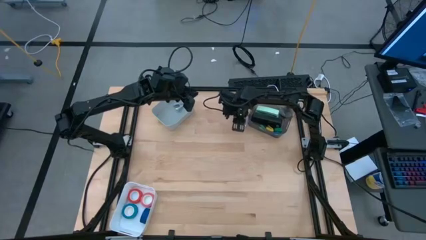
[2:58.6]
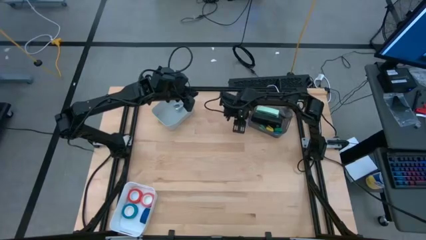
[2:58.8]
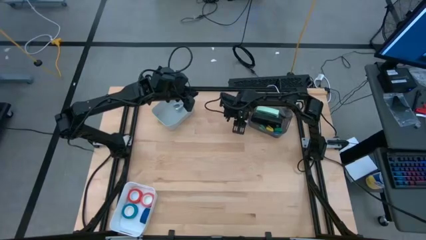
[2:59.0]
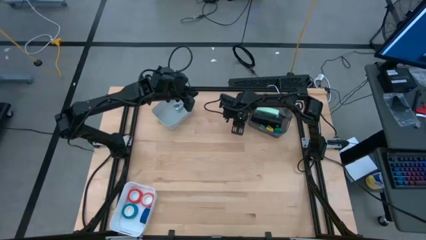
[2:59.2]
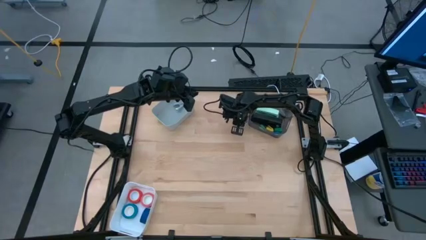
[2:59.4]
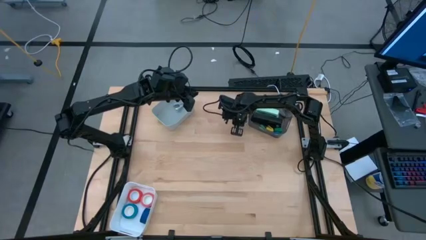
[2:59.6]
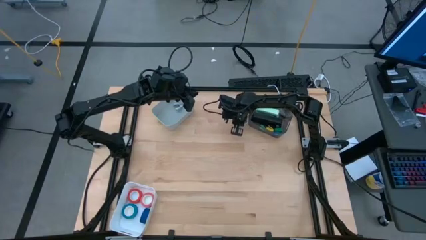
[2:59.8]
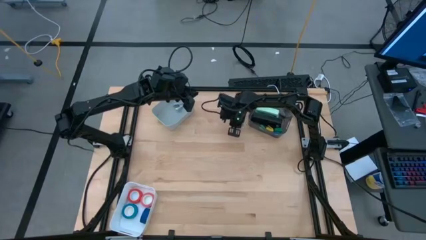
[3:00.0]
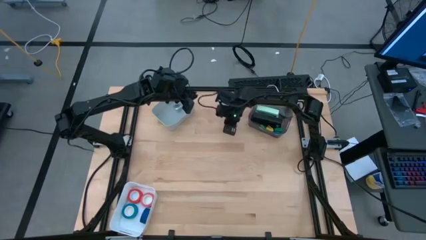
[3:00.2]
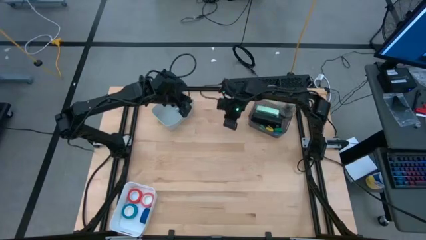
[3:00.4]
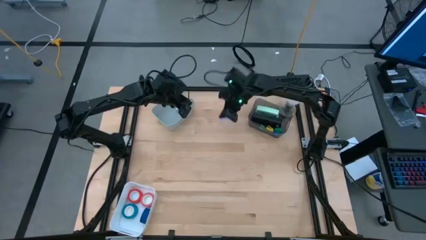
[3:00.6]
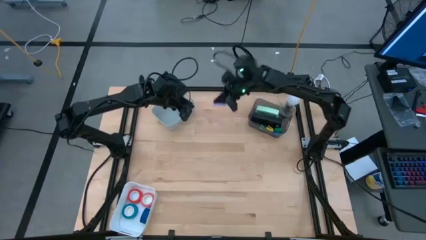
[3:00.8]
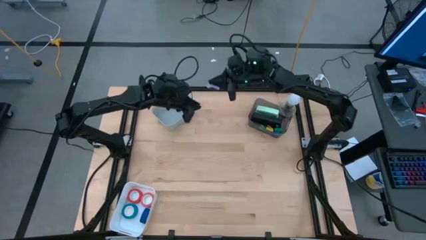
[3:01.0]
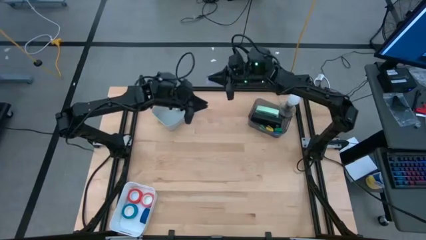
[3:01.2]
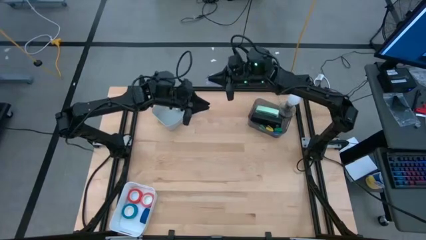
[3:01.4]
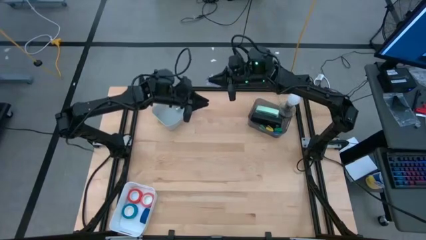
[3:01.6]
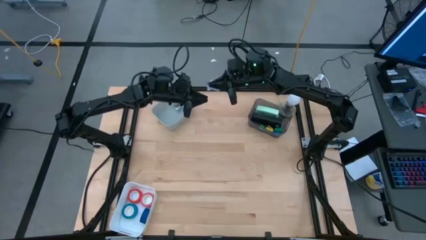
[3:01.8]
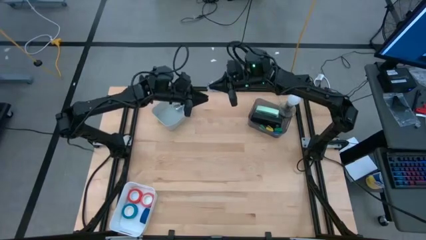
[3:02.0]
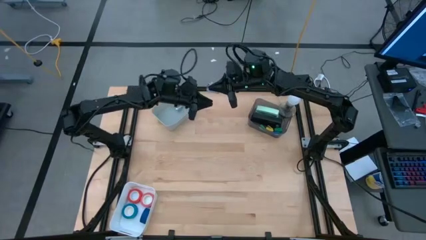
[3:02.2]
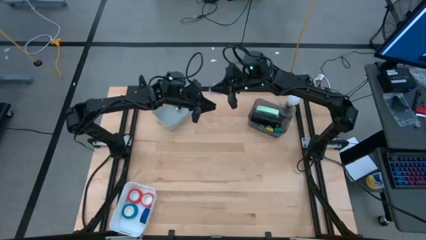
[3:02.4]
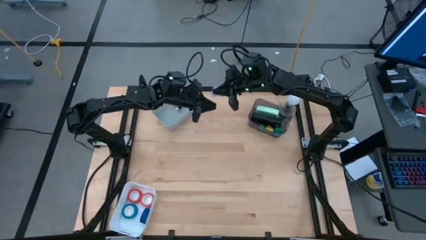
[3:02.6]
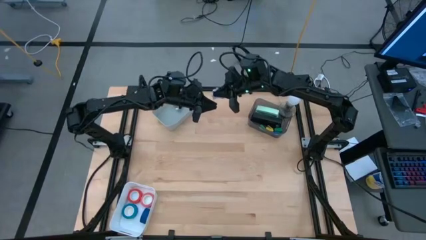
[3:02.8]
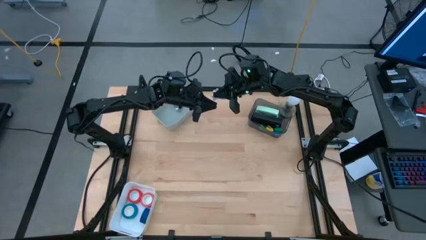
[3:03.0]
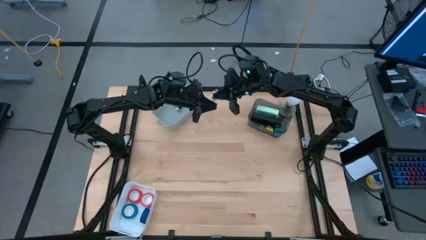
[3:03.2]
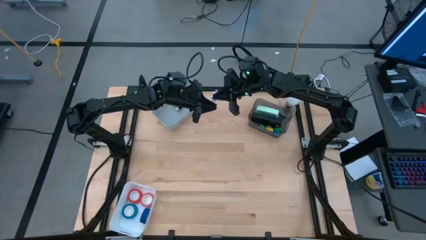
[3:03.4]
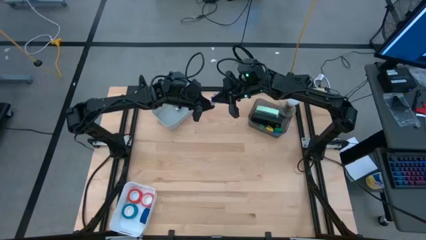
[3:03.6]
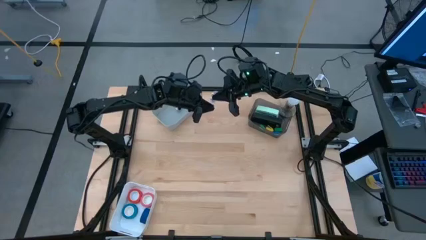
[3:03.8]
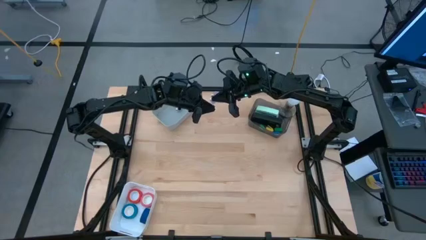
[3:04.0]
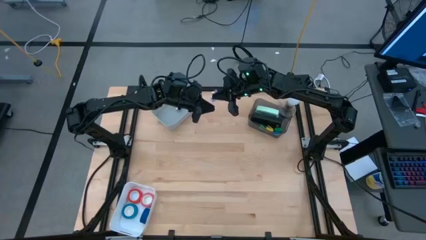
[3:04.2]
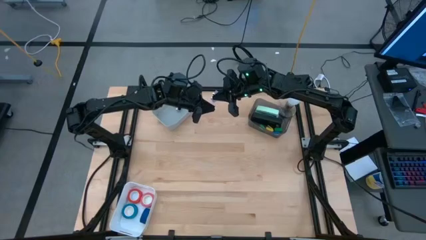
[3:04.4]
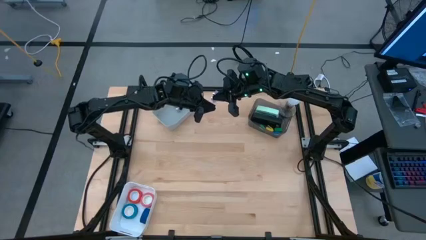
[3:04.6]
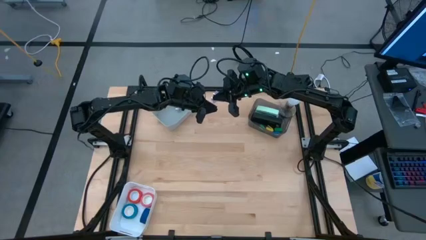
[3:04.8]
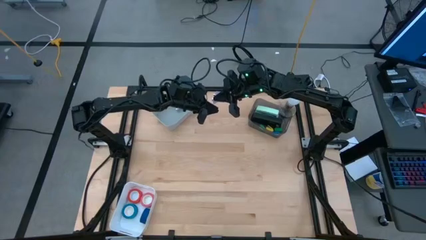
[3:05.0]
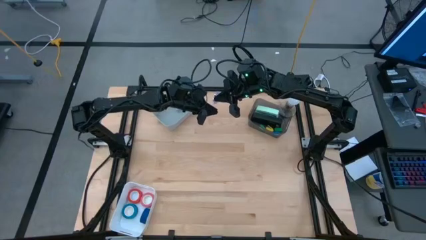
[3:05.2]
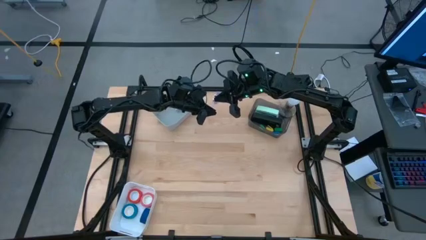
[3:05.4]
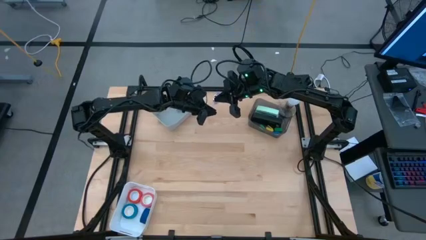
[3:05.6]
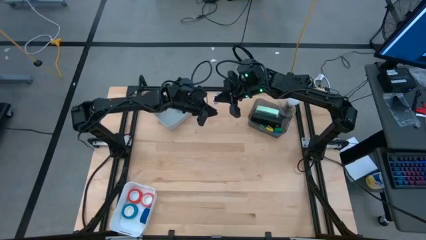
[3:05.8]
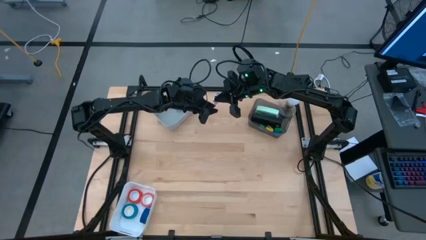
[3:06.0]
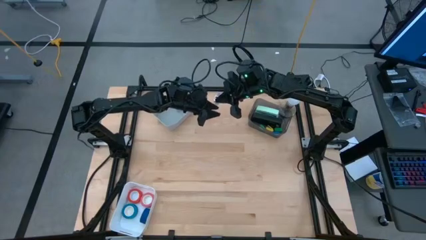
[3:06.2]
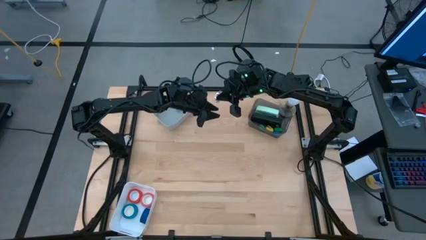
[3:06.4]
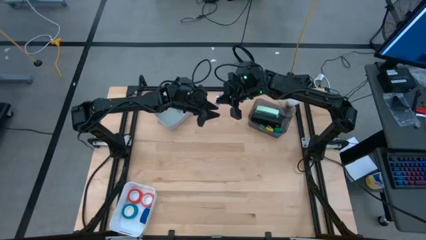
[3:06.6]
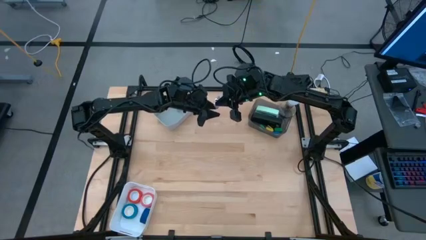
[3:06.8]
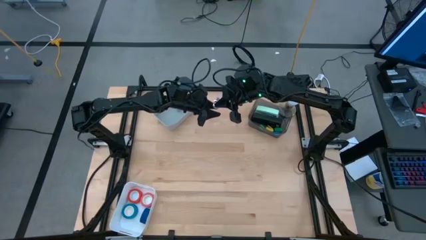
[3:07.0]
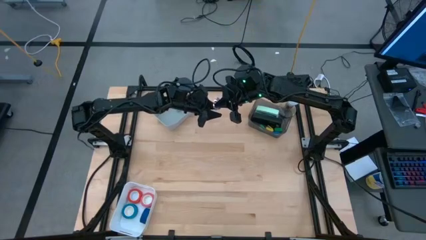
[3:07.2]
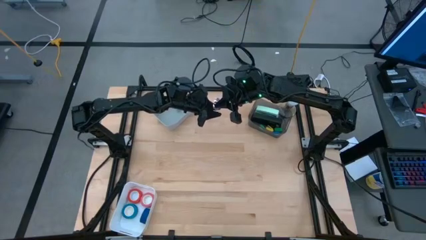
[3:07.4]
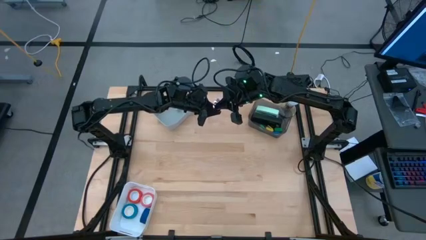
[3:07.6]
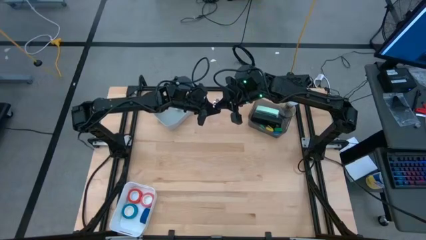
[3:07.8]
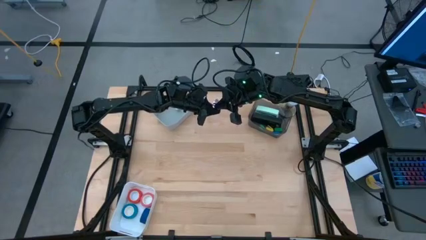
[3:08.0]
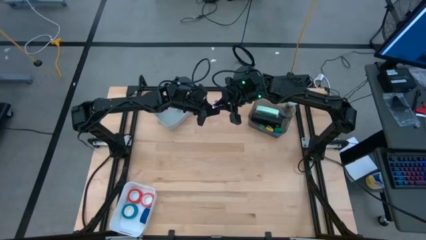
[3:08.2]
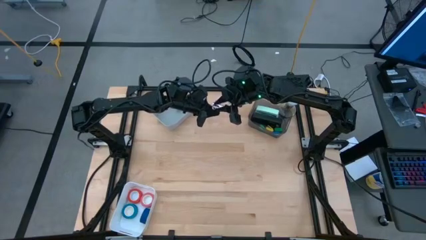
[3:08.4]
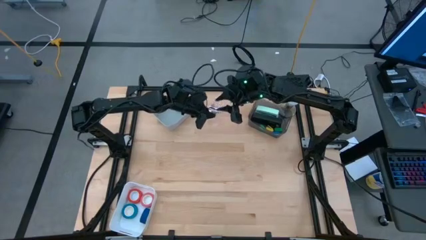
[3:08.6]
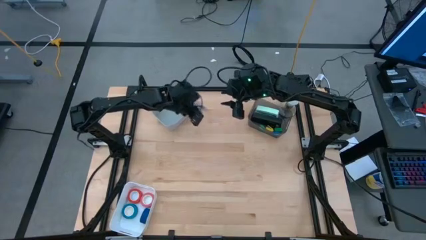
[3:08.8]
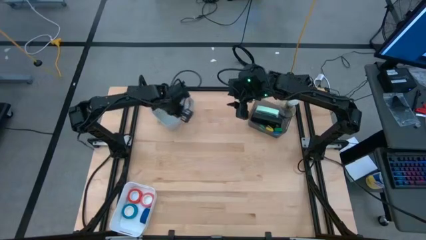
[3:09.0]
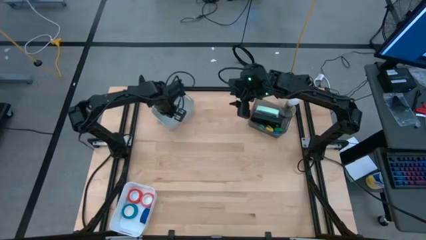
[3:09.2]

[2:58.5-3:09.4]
Task: Pick and place Stapler, Stapler remover, tape
Put the purple staple remover into the grey bin
